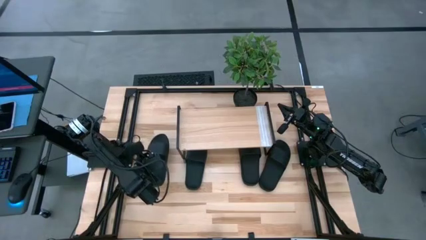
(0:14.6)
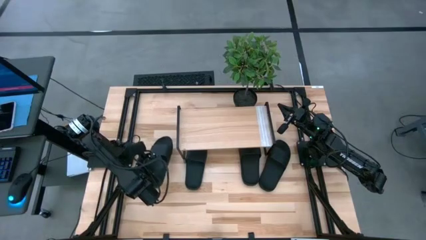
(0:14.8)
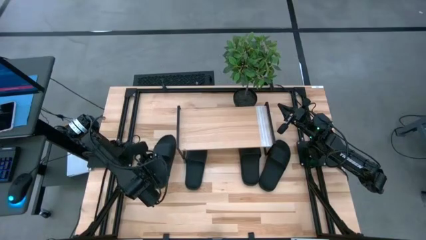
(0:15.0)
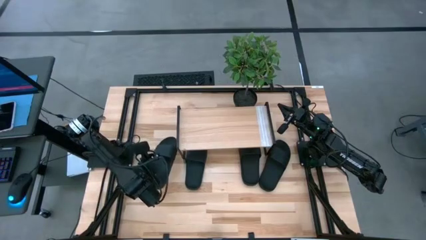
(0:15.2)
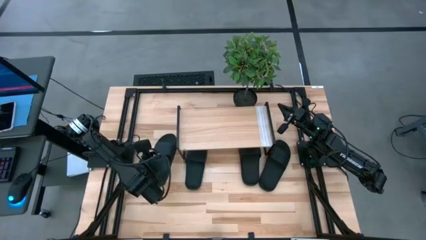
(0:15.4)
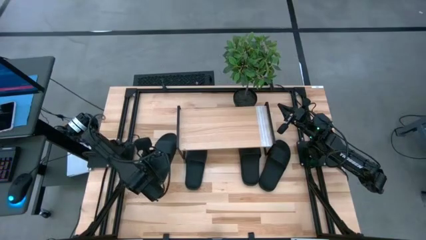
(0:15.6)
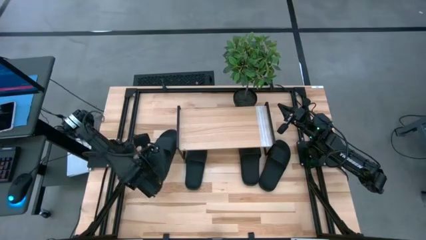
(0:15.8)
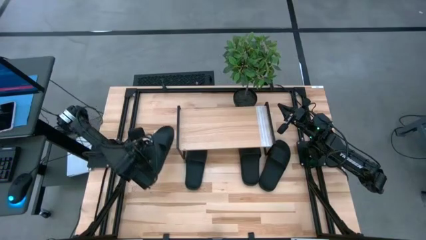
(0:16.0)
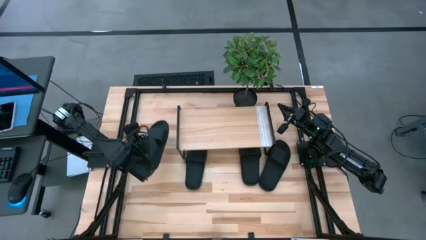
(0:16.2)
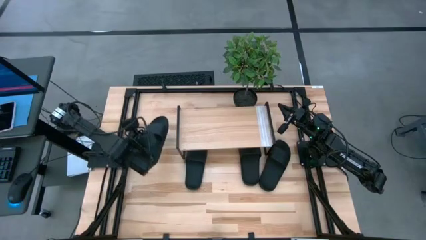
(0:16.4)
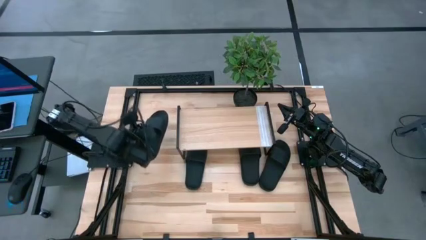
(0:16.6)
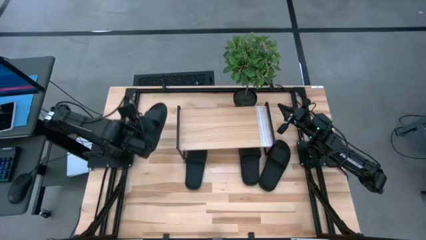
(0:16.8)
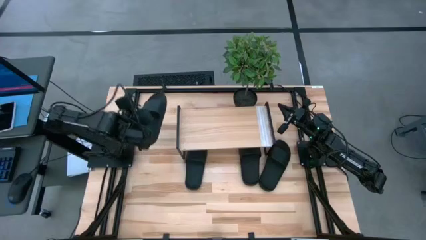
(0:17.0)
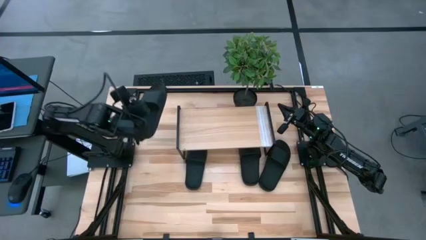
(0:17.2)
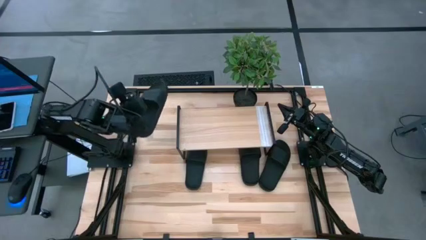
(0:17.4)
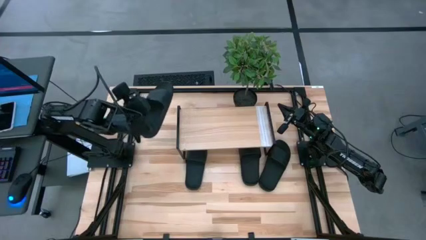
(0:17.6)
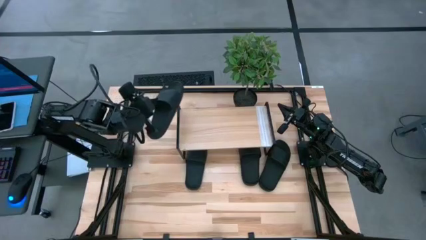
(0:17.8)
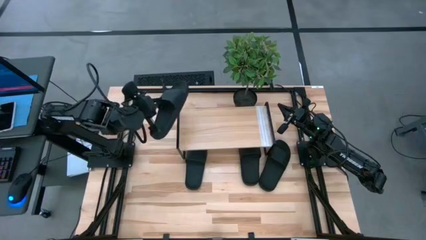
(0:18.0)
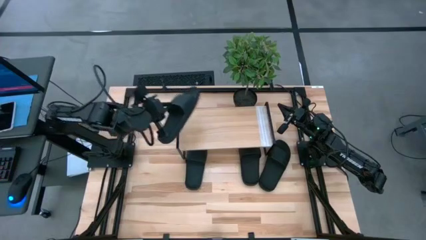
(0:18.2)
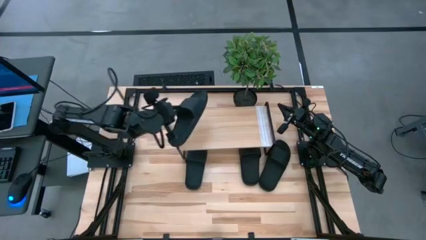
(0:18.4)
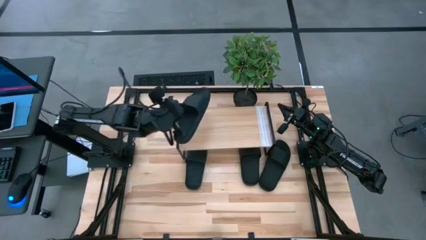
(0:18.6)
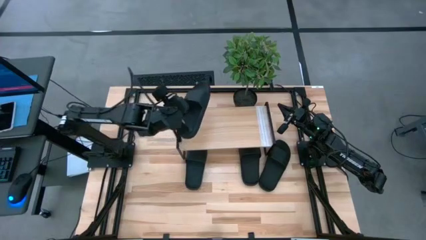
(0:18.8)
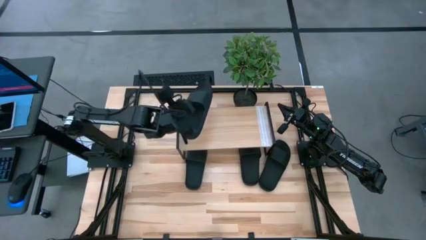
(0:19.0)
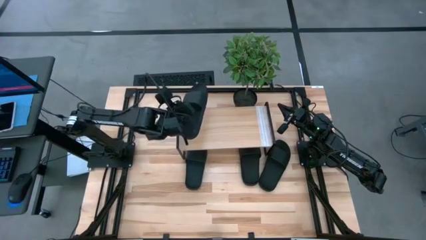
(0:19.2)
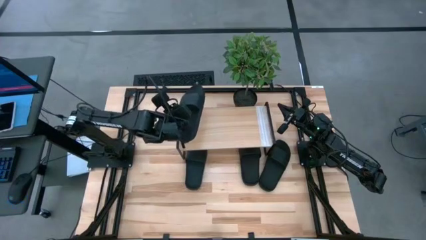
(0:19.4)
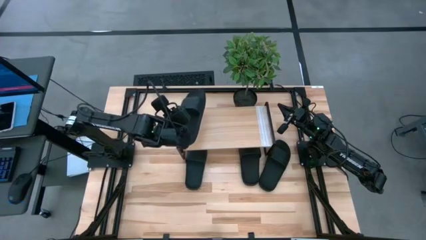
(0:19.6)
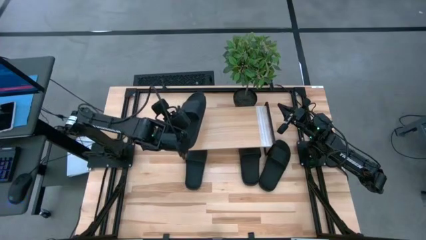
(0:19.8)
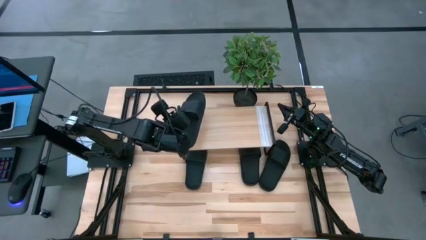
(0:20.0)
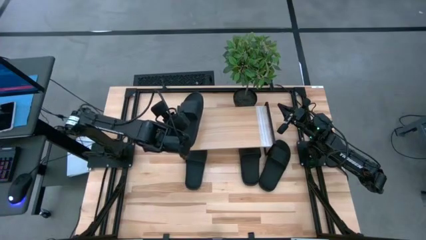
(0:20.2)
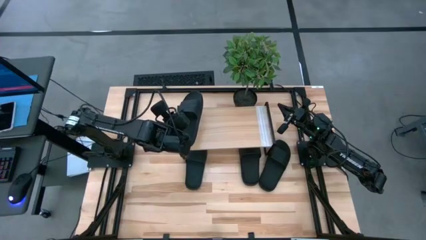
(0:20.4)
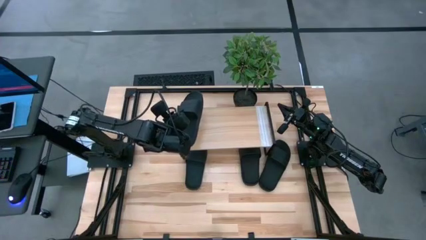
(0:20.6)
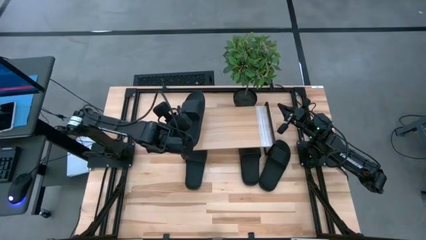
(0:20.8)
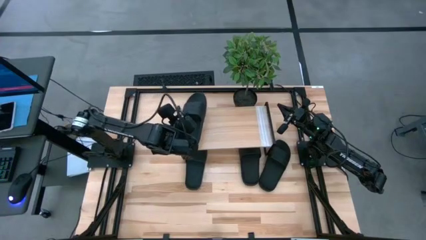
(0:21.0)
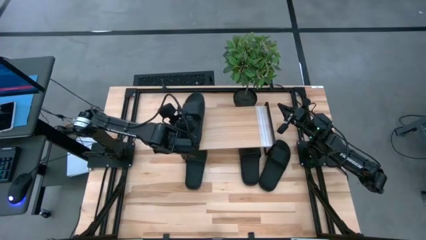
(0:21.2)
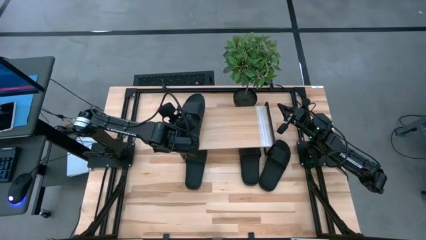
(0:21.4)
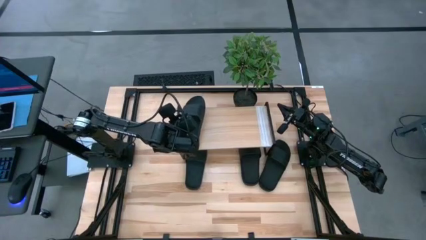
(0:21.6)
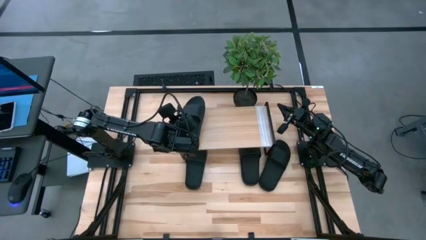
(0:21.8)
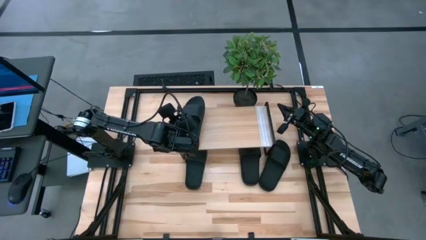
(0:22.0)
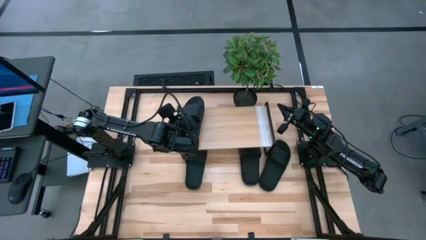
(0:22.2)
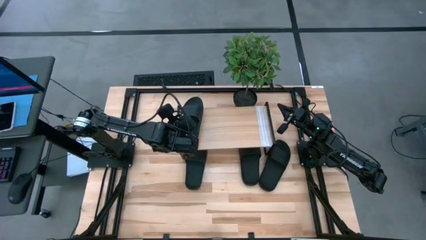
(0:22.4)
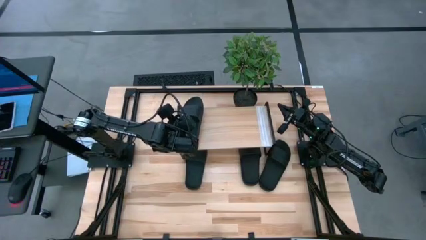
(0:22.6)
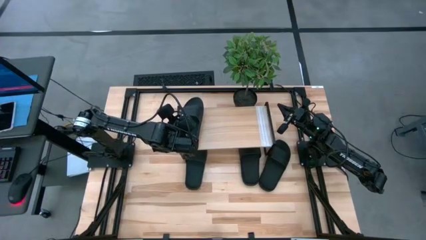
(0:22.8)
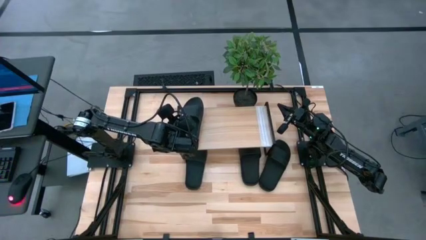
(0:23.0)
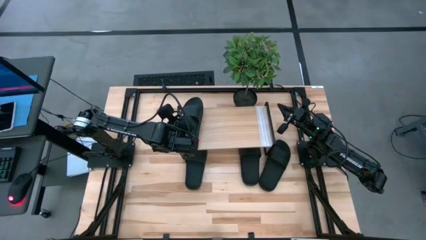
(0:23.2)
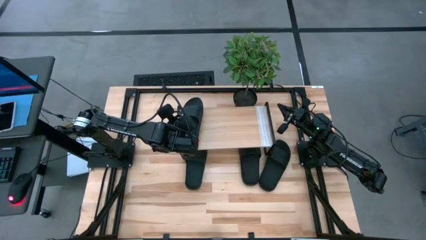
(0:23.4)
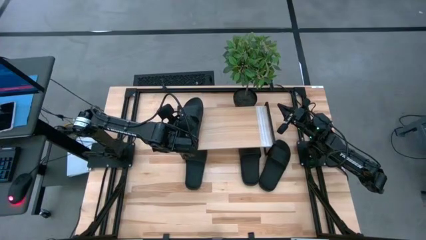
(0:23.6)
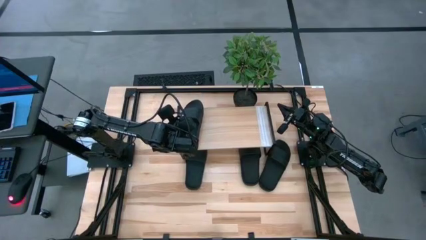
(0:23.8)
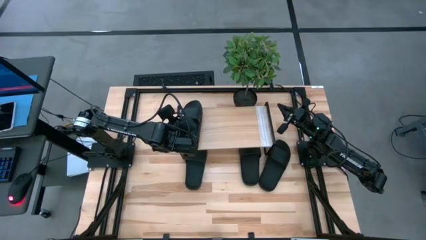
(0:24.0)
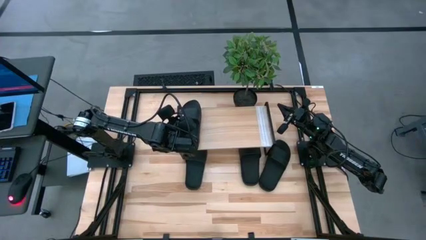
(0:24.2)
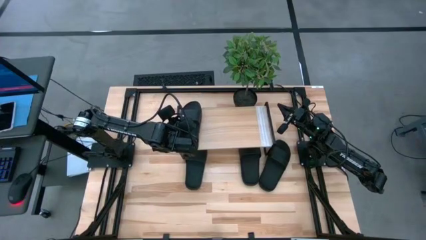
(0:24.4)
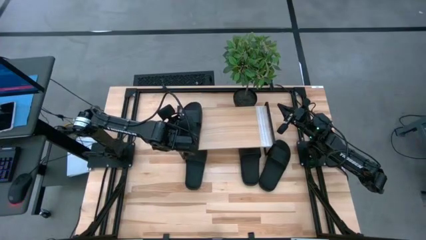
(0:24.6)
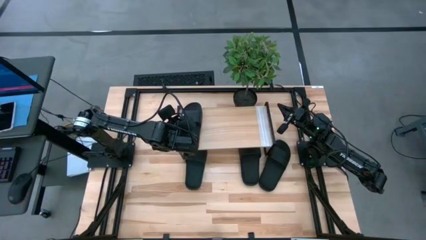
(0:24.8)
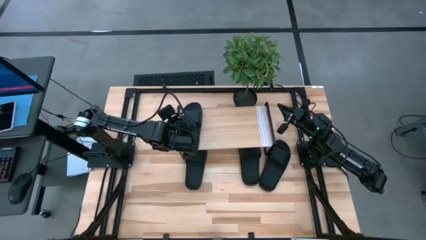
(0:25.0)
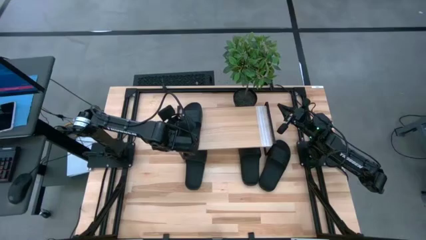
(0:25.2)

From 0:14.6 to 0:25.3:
Task: Pick and place slides into the shelf
Put the black slide on the shelf

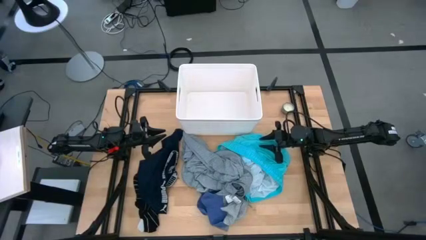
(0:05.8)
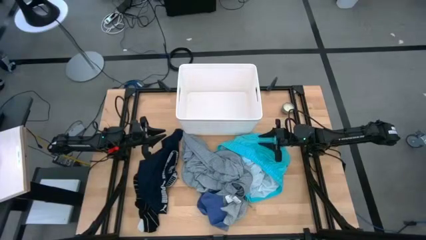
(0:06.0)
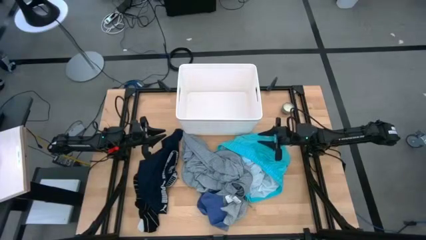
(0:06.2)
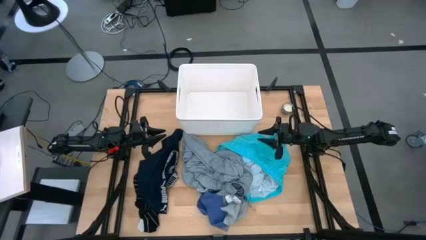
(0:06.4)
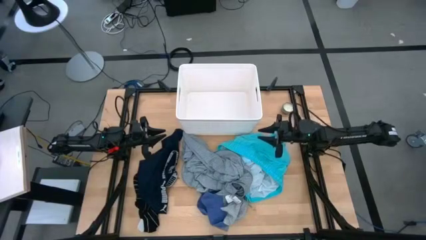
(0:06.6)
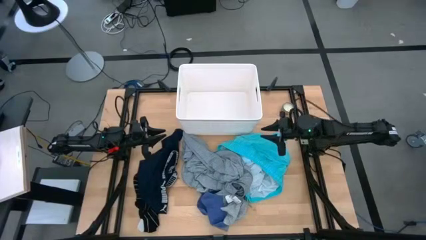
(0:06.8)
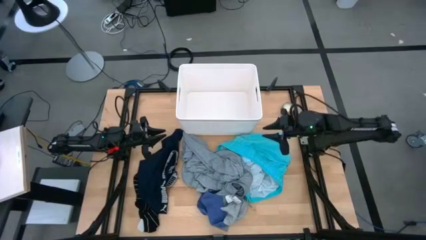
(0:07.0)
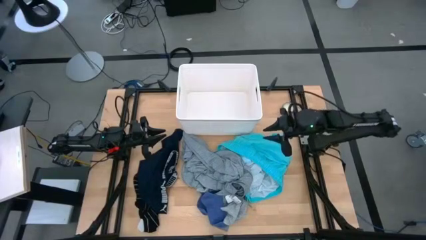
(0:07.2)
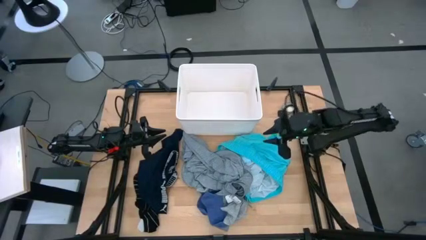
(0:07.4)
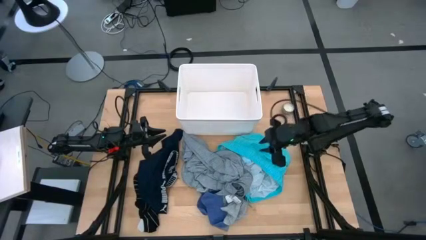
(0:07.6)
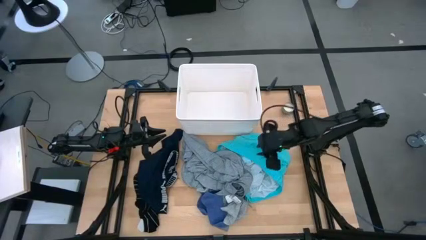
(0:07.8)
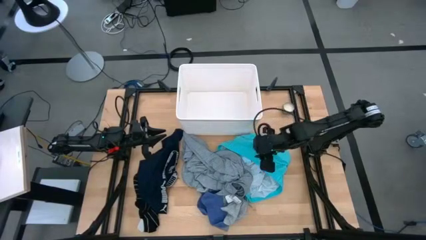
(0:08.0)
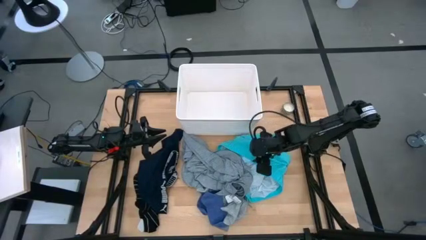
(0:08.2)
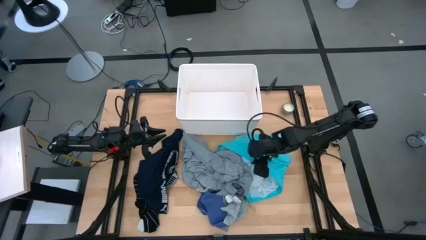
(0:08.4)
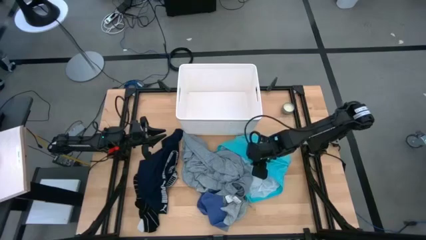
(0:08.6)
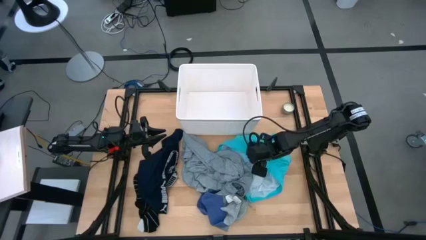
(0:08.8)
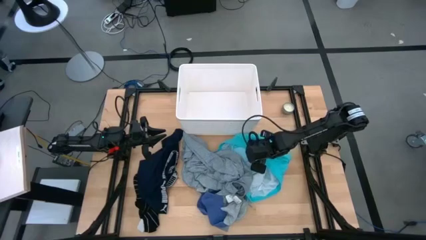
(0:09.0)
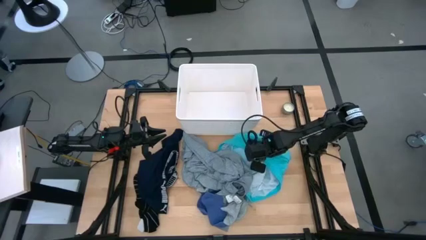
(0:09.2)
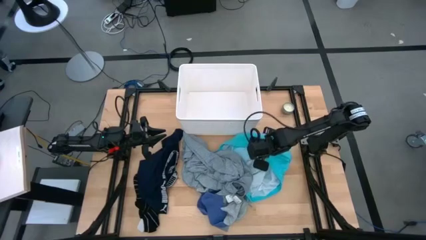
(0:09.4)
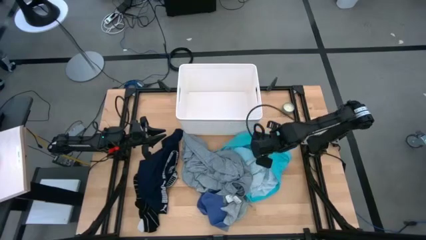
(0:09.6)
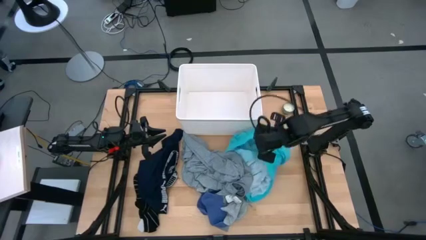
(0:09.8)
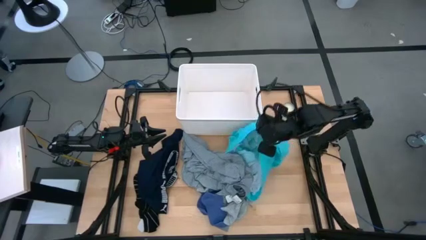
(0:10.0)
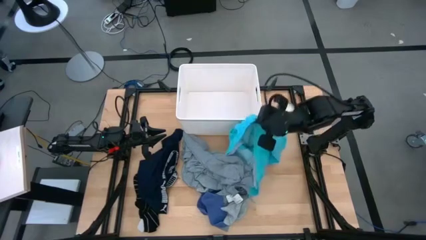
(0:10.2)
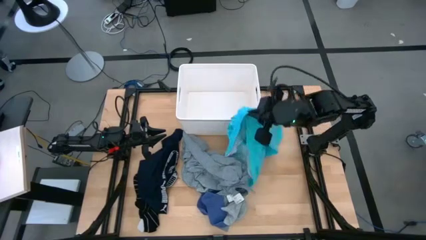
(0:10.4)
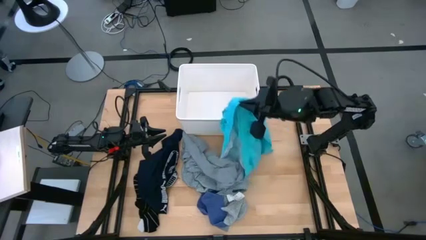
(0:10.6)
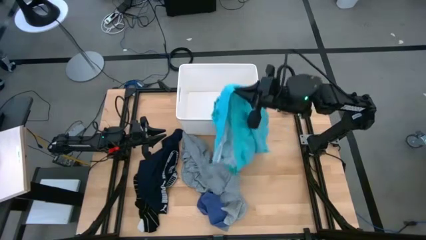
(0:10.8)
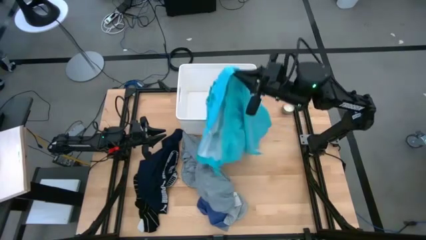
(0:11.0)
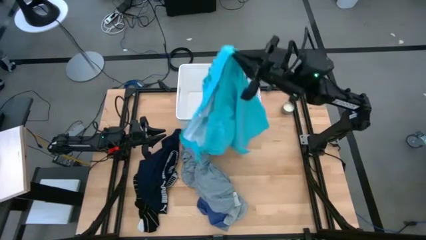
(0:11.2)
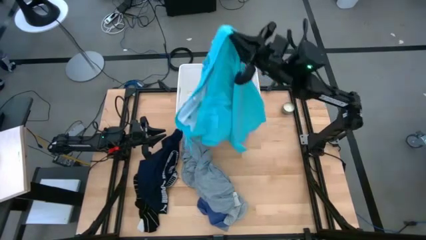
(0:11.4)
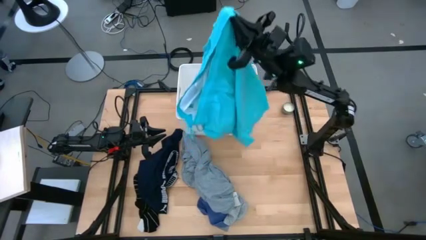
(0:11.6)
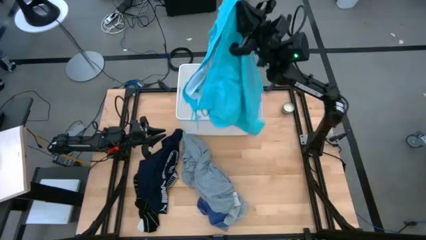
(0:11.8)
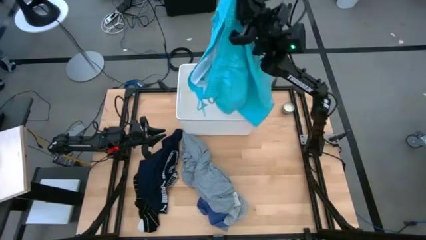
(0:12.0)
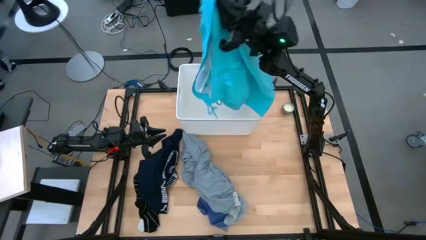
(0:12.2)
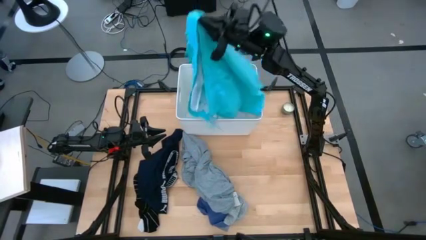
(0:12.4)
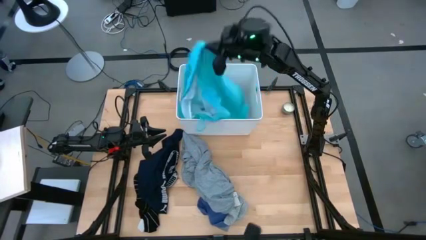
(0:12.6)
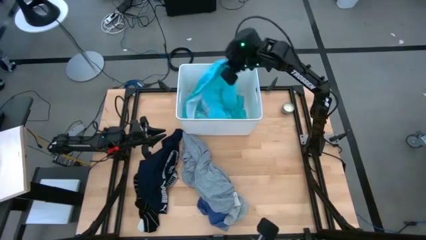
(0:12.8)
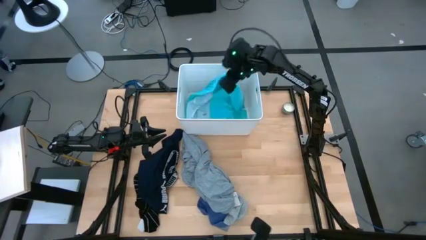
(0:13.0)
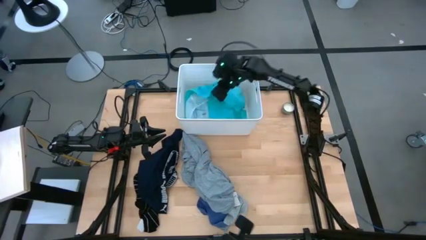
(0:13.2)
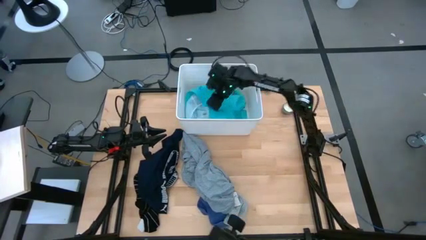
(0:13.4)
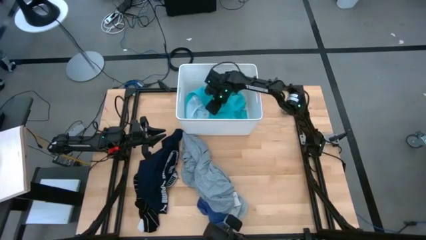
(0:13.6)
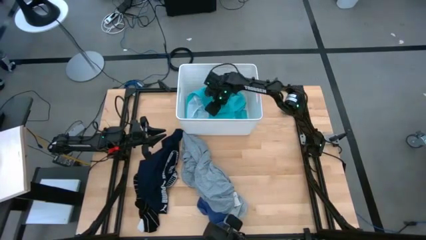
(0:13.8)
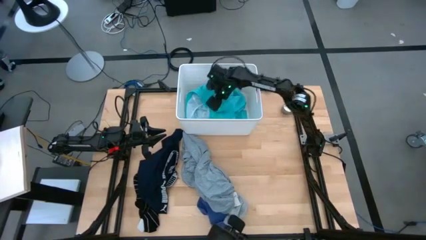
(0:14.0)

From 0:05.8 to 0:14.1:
Task: Sort clothes
Put the blue shorts into the white laundry bin
